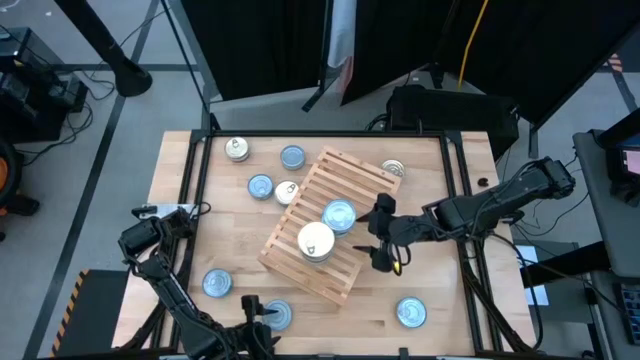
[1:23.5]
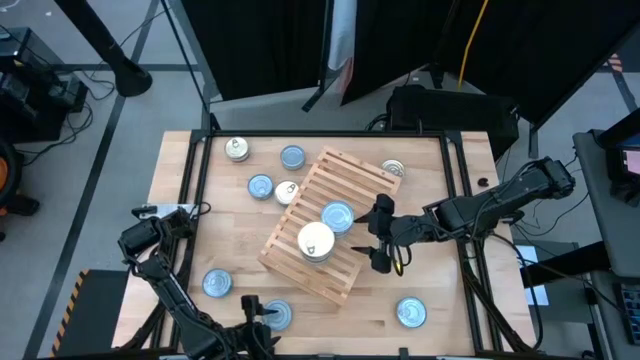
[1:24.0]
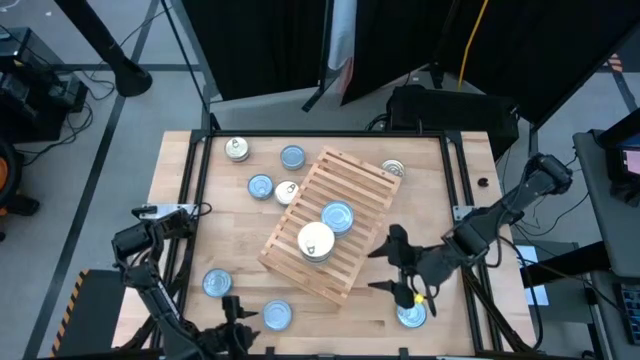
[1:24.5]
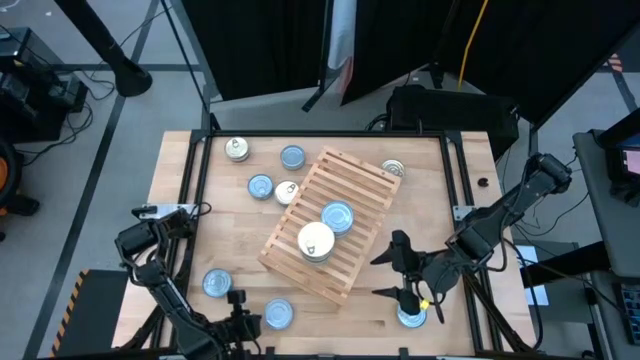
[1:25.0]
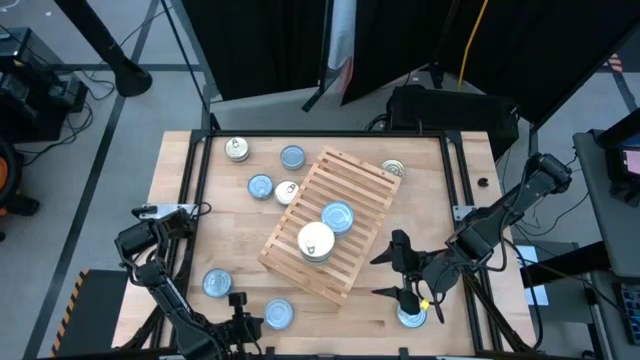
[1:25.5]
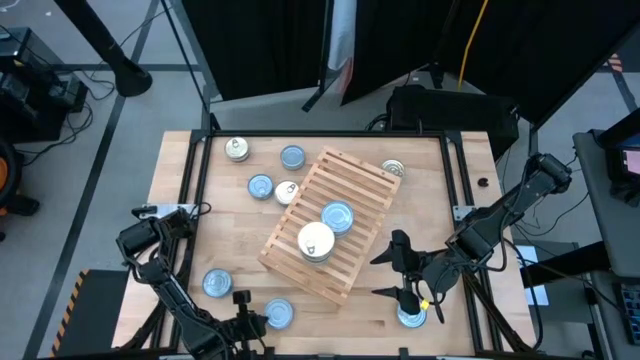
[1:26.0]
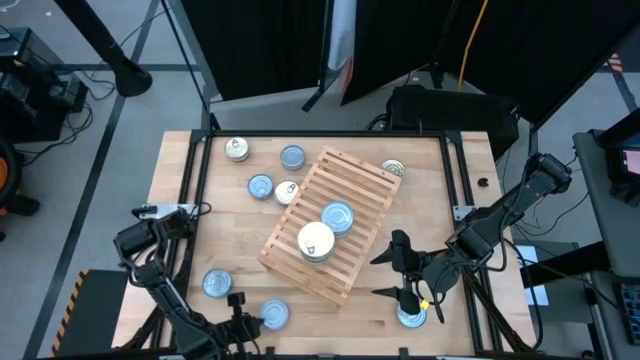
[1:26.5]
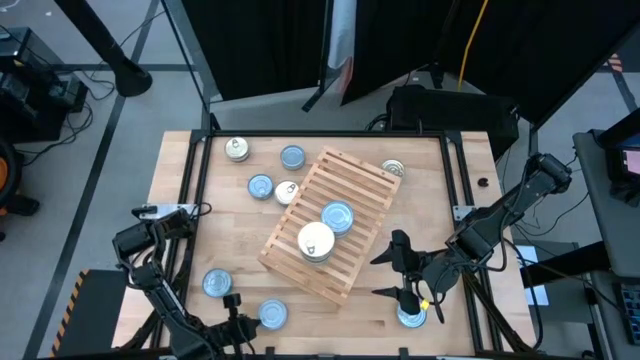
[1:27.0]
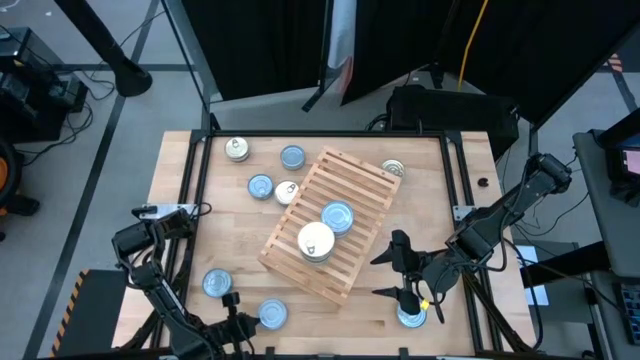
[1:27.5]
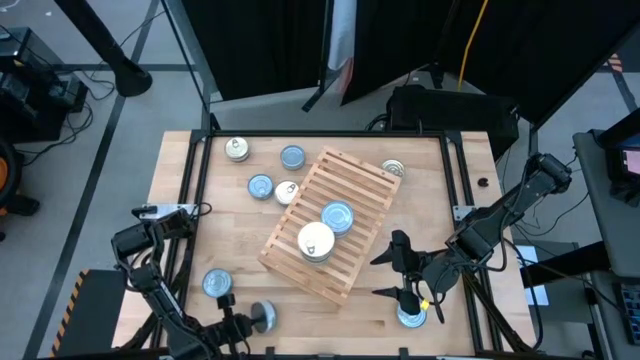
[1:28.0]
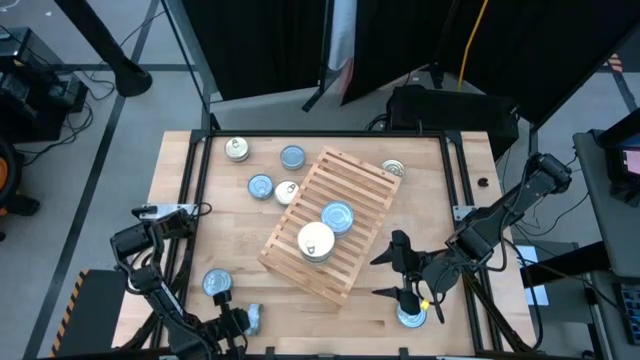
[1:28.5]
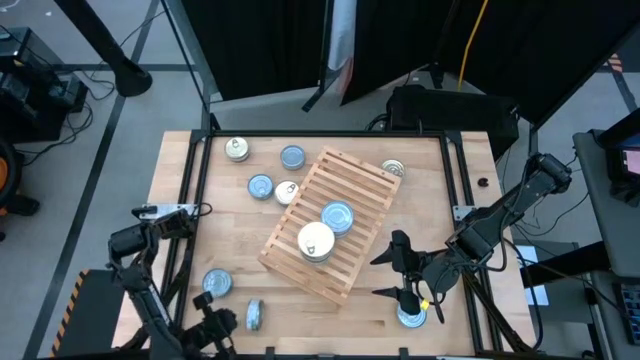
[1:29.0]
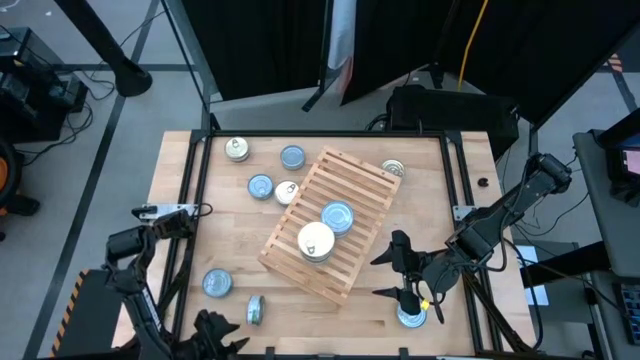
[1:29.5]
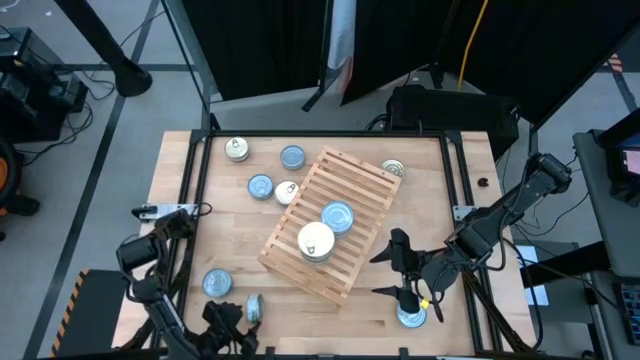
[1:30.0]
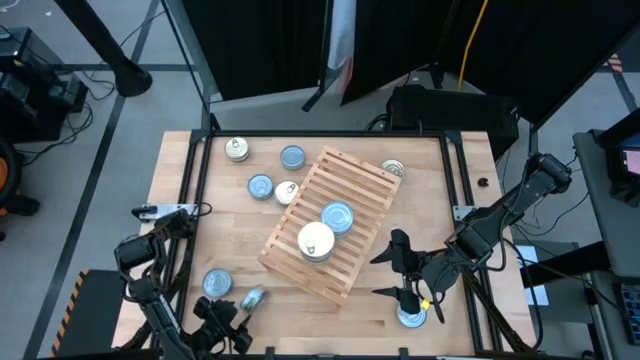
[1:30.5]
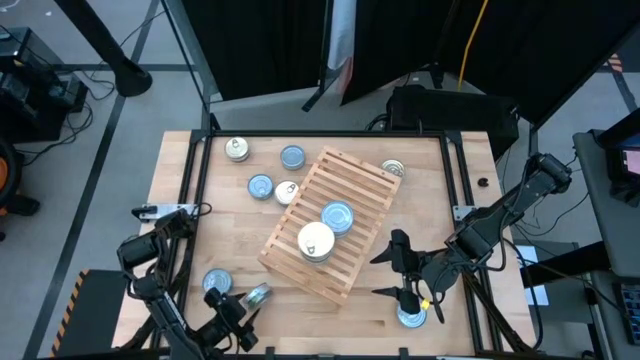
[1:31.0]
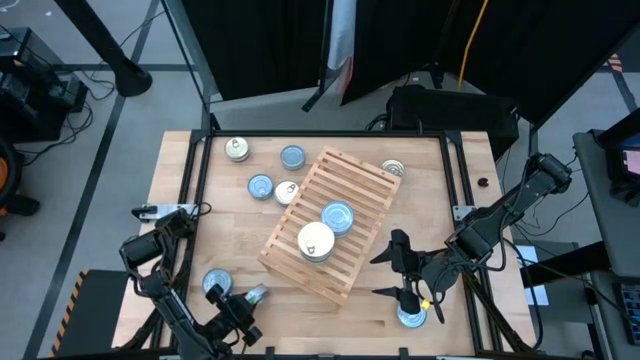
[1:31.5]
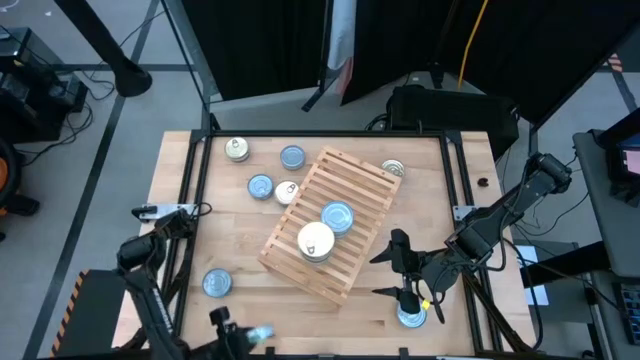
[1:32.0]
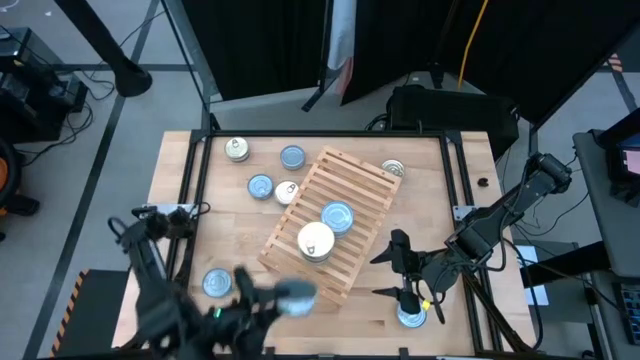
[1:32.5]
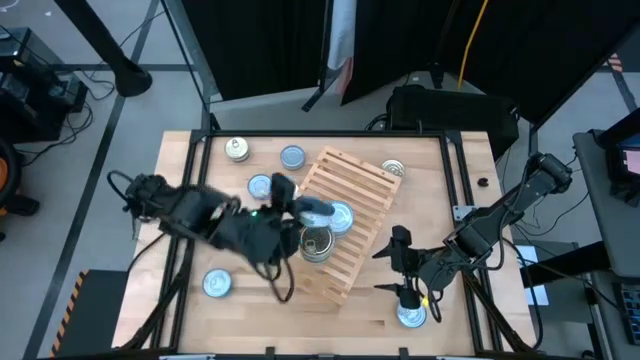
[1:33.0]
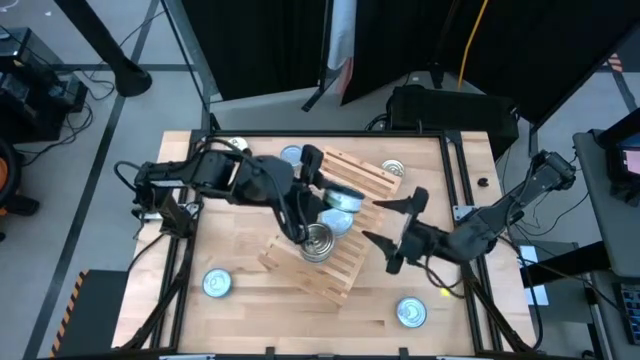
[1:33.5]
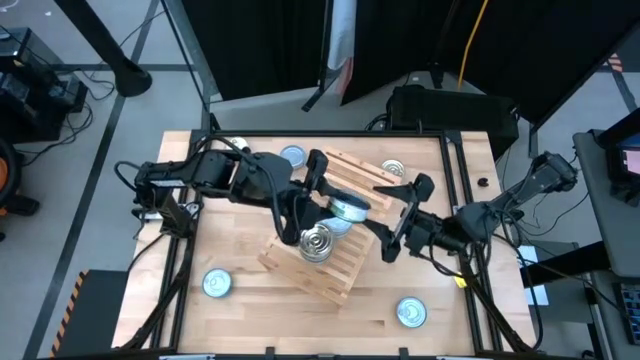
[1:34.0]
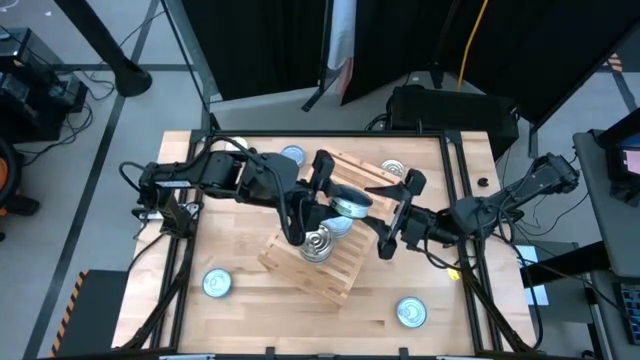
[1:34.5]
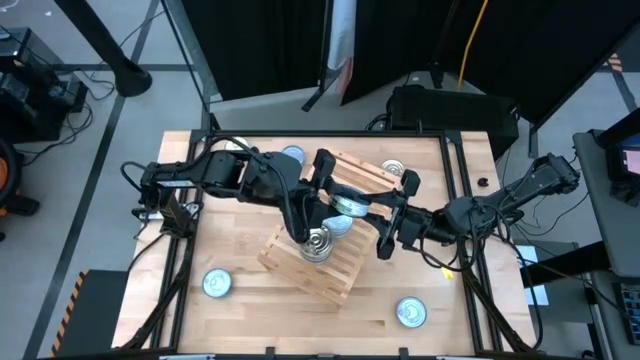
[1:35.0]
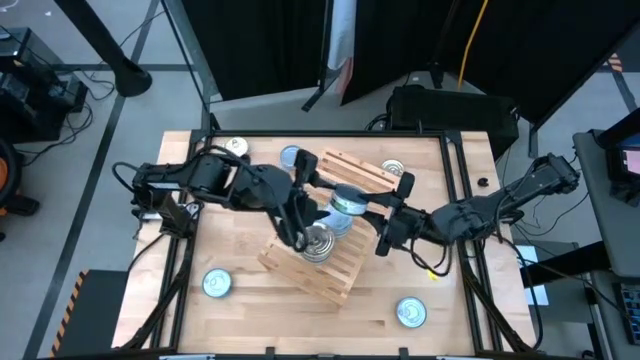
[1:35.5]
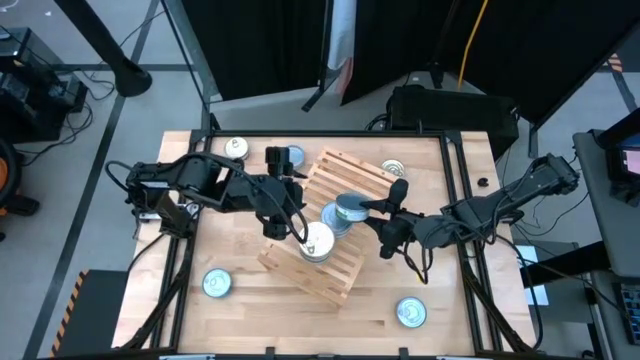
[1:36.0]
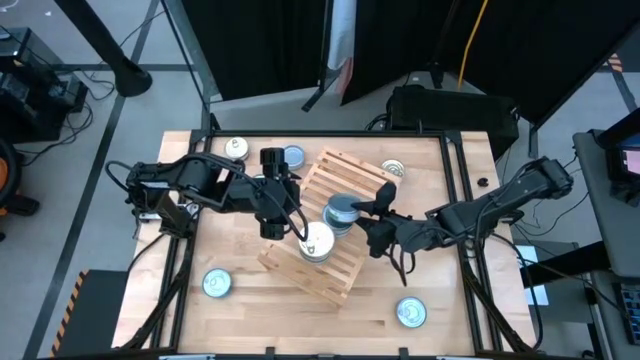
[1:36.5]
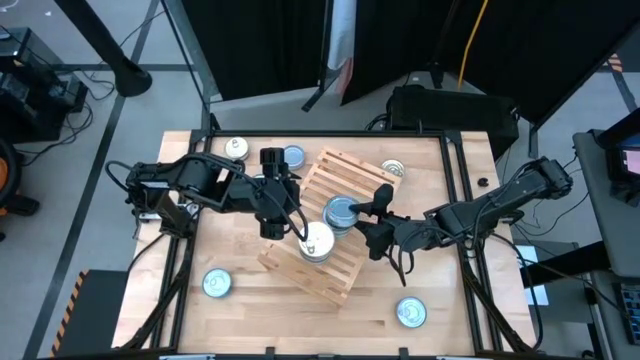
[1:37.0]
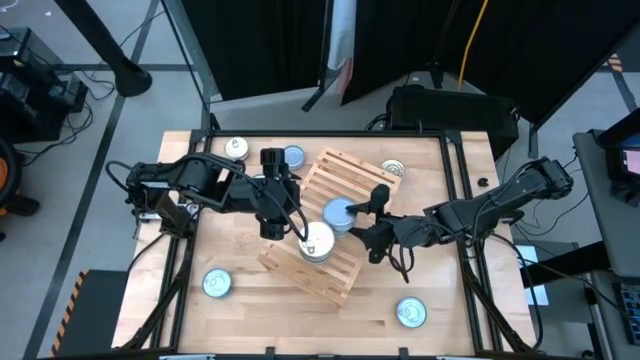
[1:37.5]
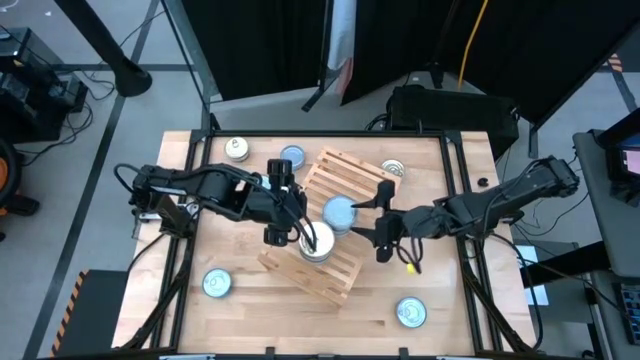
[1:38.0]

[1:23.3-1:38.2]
Task: Stack canned seafood by type on shelf
Stack the green tuna can on top of the other green tuna can on the shelf

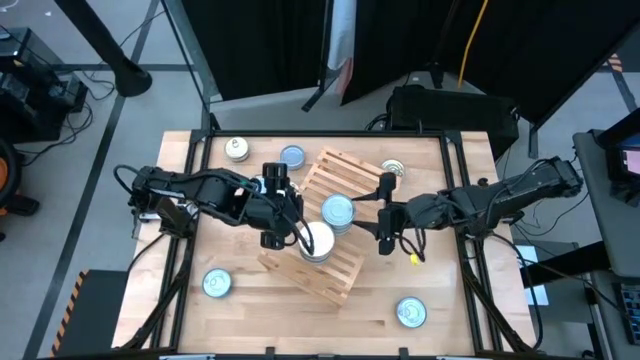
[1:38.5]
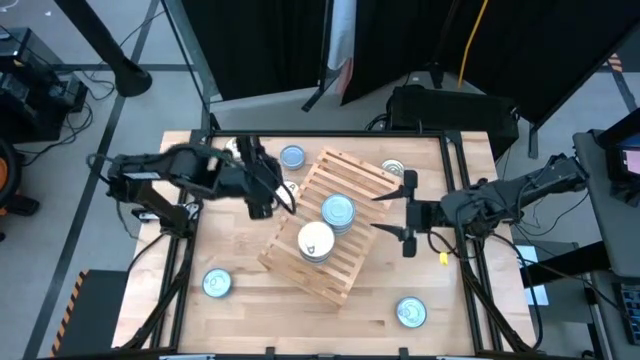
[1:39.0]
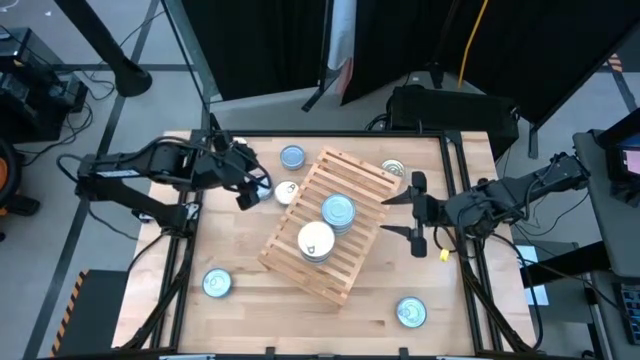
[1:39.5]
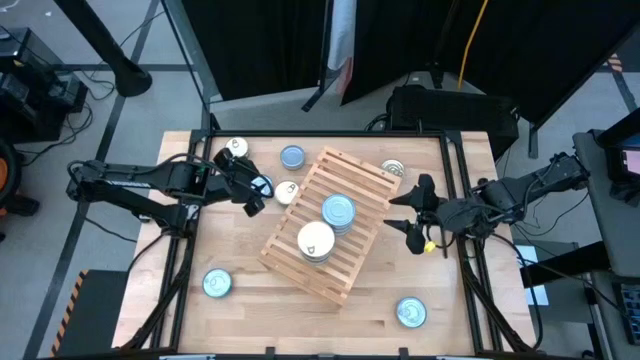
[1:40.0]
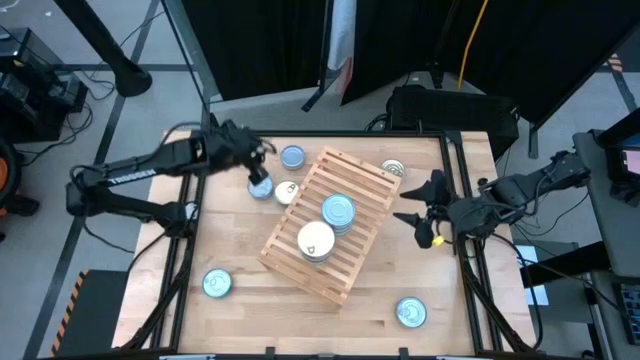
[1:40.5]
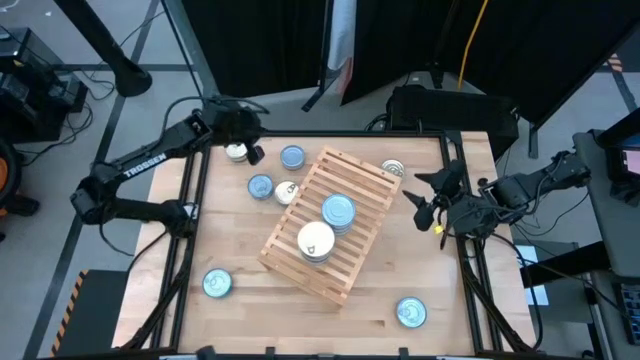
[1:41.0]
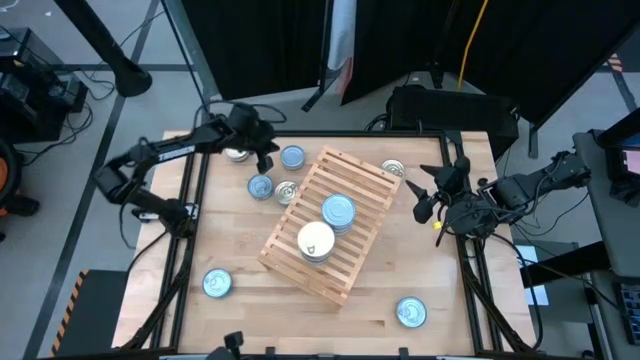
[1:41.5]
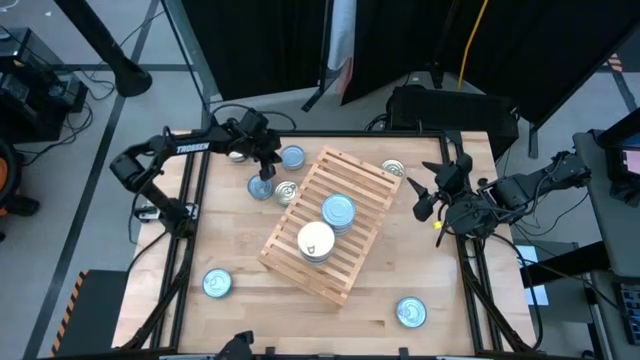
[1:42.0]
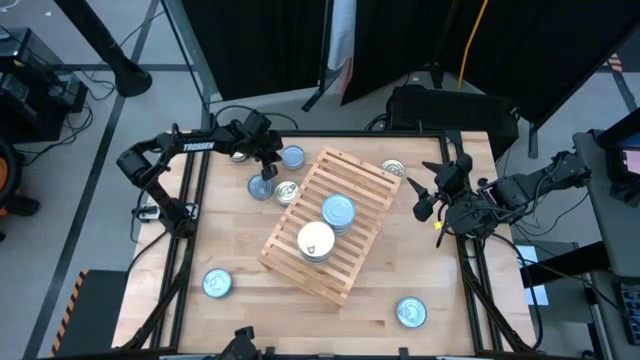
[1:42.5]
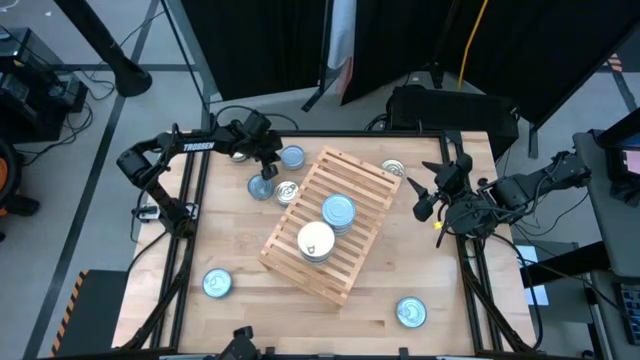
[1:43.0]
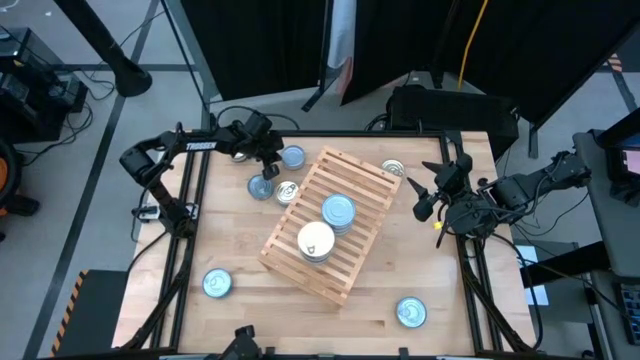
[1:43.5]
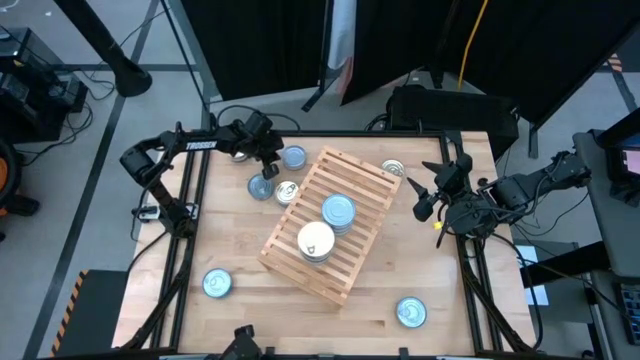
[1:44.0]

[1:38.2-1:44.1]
Stack the green tuna can on top of the other green tuna can on the shelf
